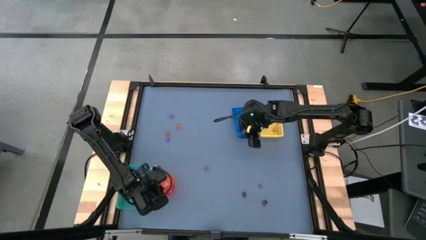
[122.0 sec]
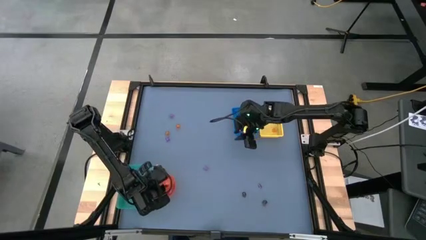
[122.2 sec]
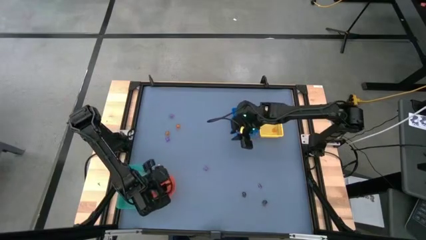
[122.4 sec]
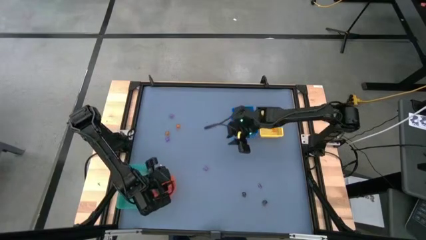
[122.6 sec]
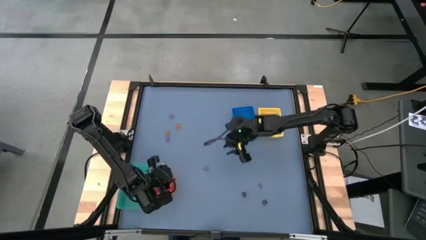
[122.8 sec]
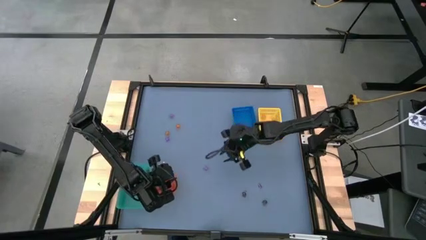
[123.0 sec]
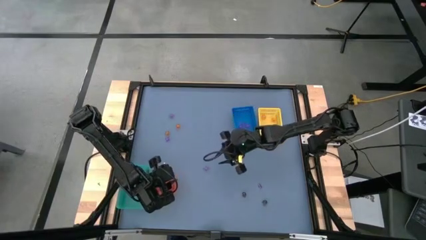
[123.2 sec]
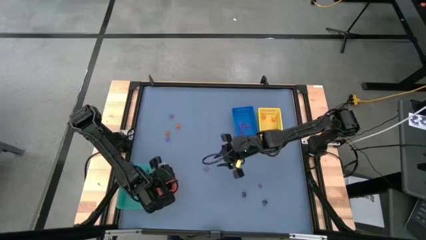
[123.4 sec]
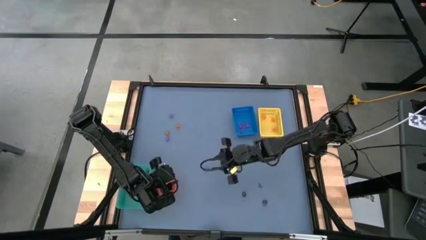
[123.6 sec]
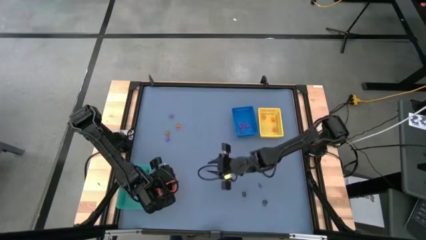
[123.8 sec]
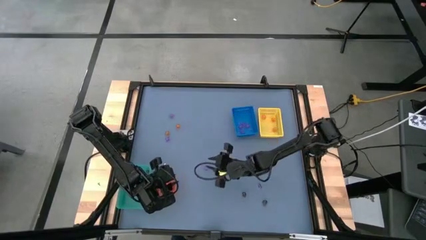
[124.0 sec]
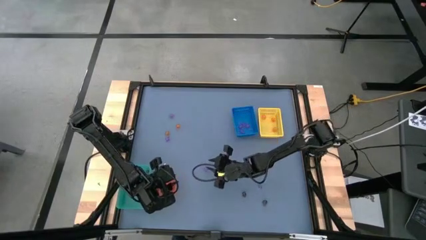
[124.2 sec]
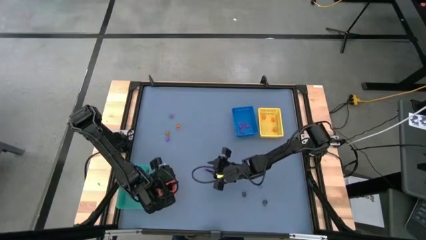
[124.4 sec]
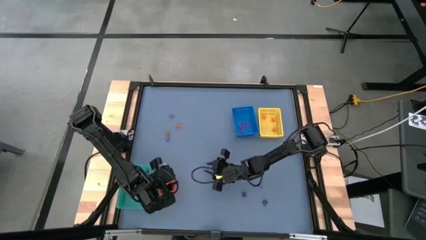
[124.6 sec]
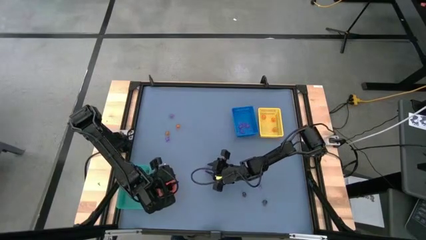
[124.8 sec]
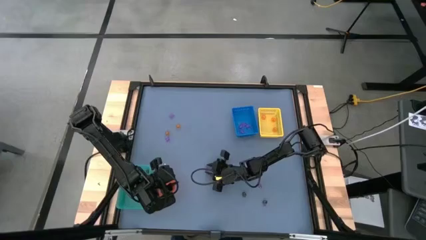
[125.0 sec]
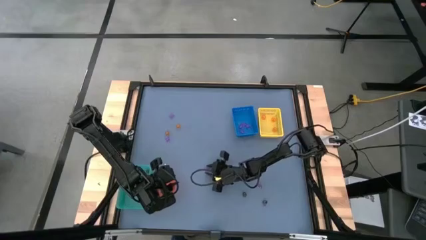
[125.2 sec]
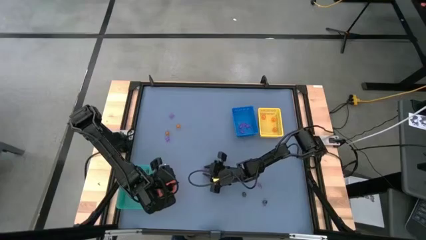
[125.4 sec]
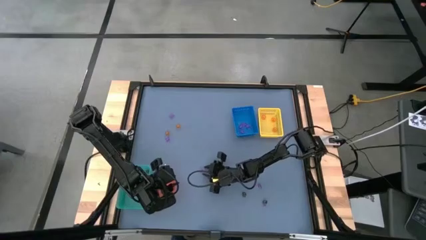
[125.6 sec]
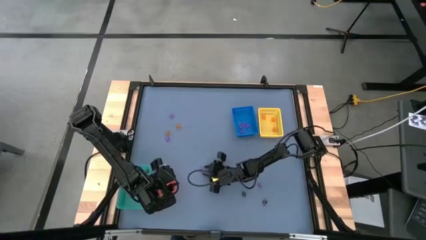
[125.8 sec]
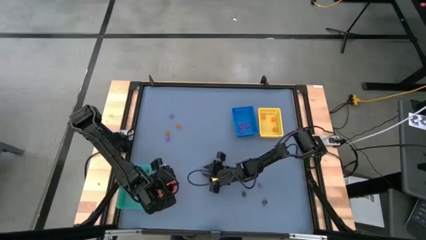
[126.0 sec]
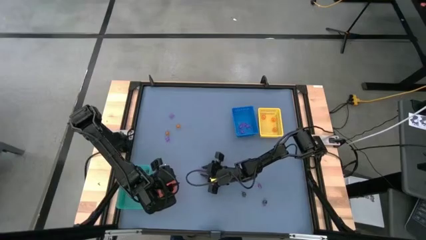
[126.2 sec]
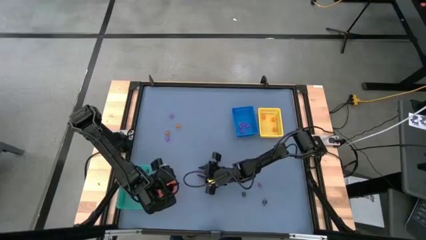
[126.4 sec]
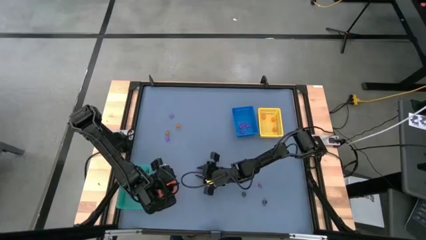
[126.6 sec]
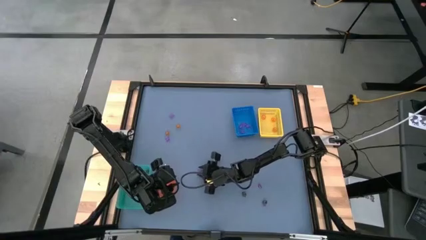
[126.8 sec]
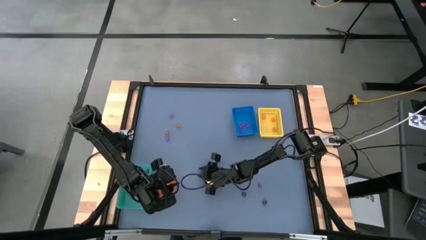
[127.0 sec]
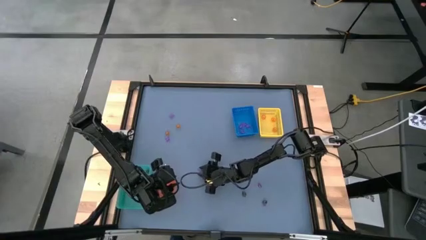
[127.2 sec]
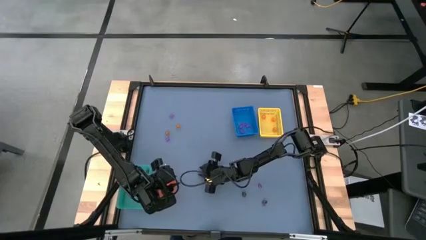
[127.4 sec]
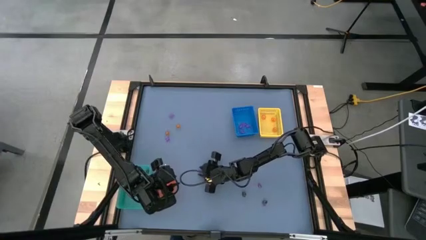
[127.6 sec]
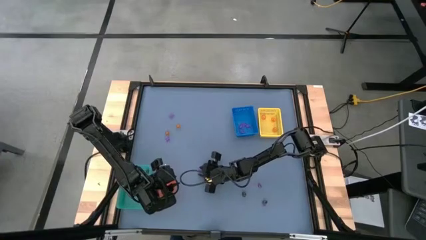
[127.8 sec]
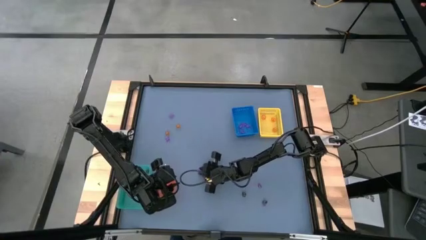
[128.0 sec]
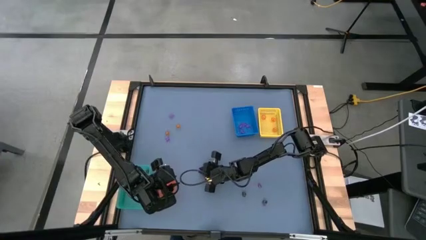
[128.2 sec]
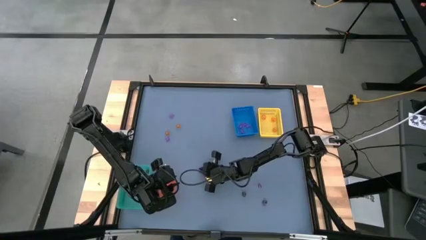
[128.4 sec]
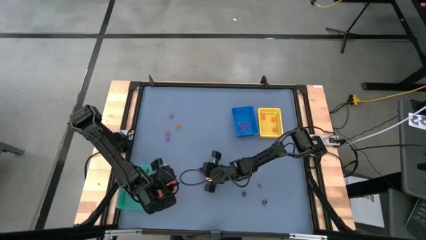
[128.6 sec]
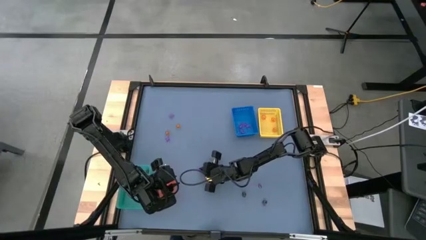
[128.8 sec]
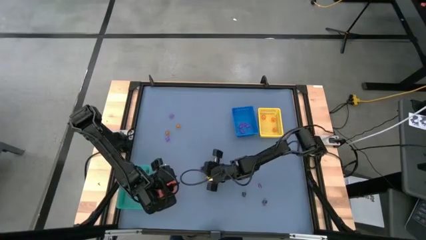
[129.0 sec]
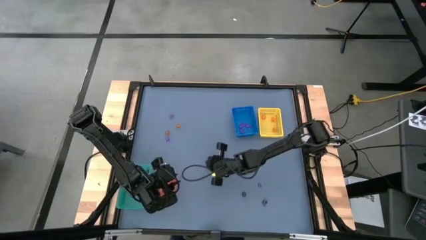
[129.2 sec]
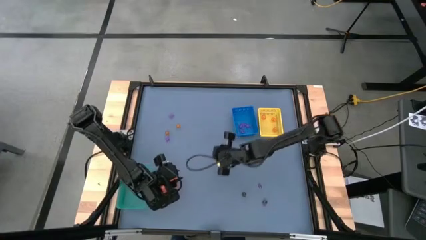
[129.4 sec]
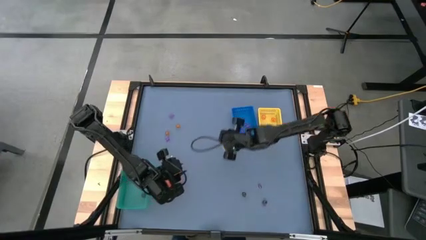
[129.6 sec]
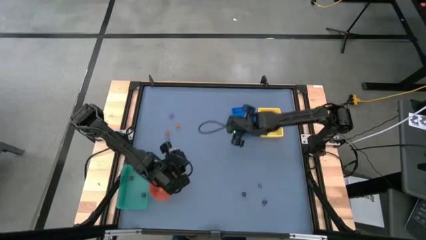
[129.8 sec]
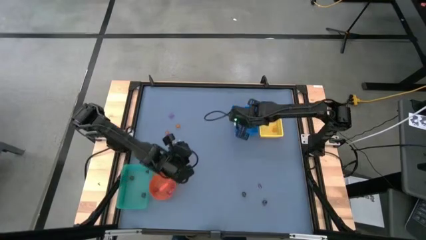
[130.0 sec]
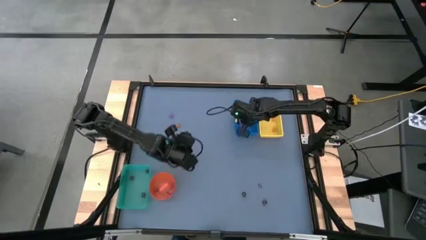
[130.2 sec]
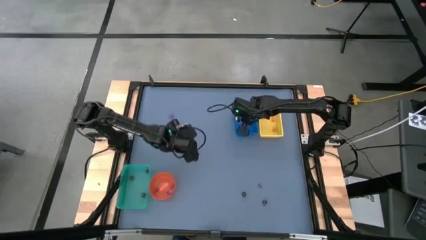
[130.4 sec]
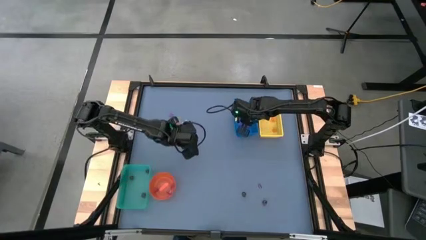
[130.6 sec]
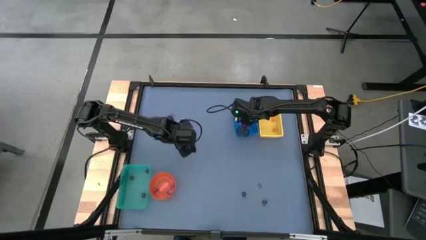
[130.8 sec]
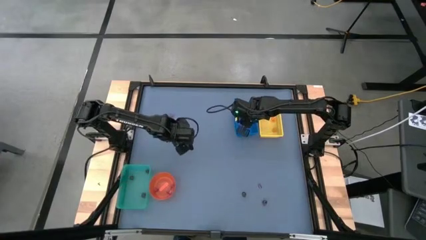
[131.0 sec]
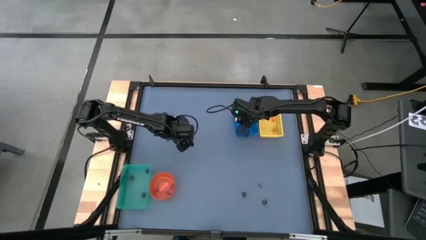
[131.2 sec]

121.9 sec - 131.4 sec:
Task: Sort Halloween decoration
Put the violet spider toy into the blue box

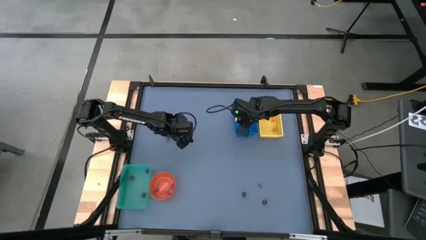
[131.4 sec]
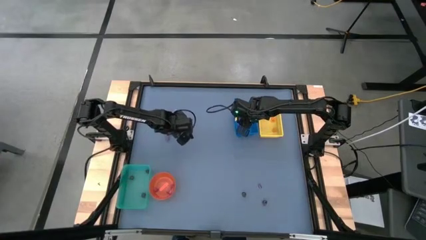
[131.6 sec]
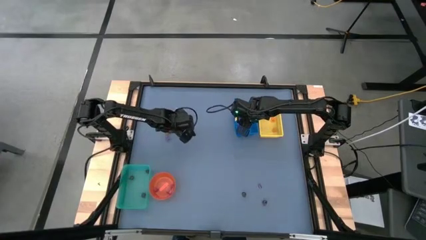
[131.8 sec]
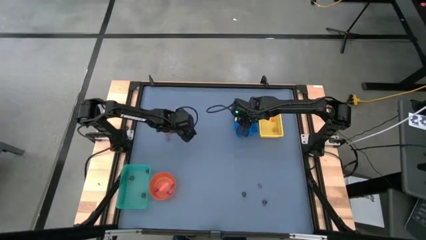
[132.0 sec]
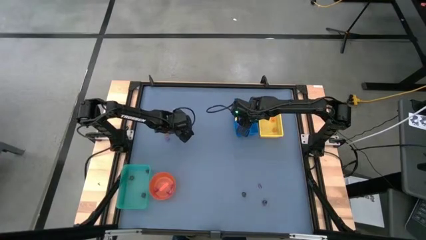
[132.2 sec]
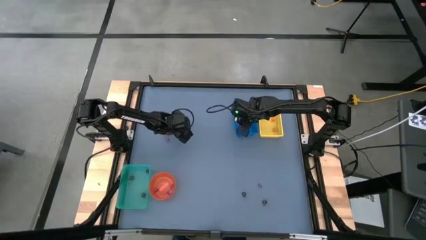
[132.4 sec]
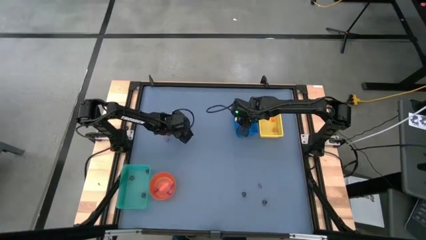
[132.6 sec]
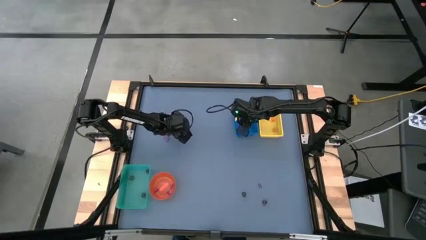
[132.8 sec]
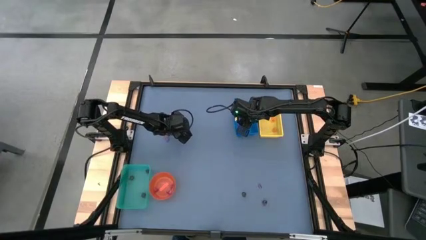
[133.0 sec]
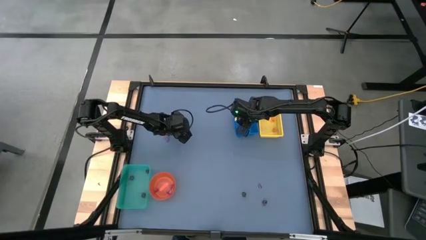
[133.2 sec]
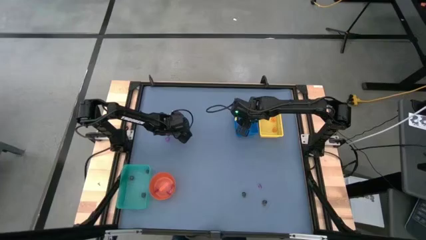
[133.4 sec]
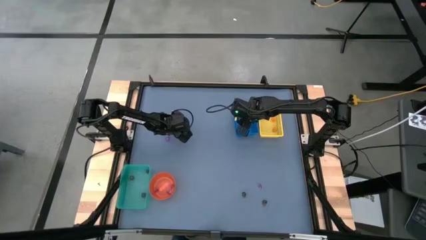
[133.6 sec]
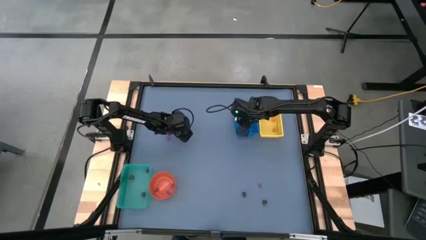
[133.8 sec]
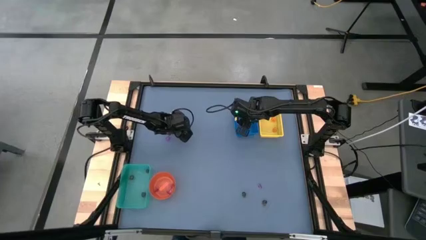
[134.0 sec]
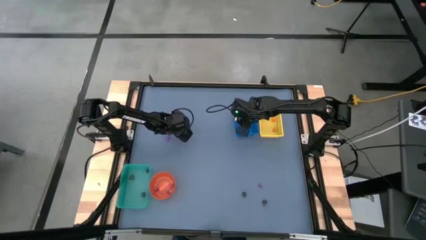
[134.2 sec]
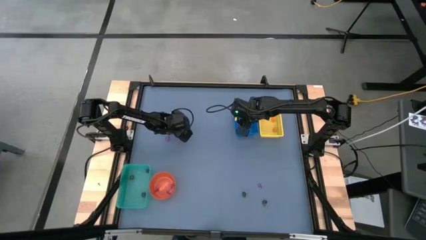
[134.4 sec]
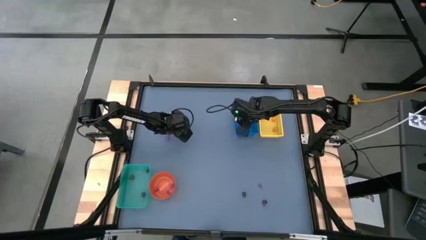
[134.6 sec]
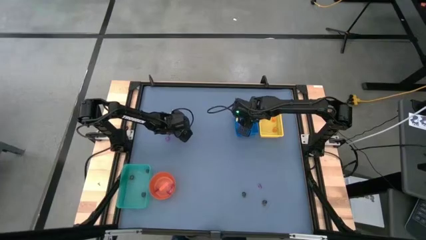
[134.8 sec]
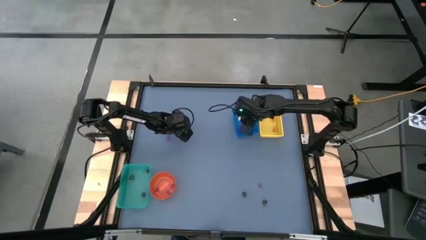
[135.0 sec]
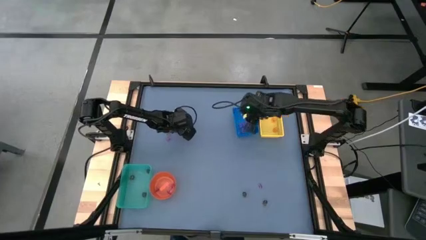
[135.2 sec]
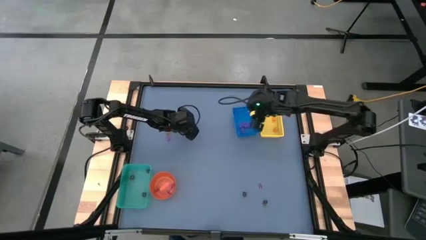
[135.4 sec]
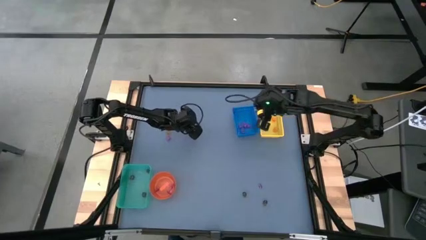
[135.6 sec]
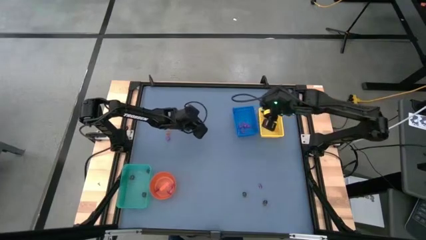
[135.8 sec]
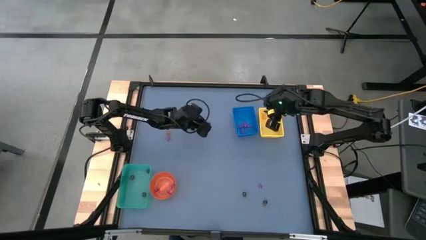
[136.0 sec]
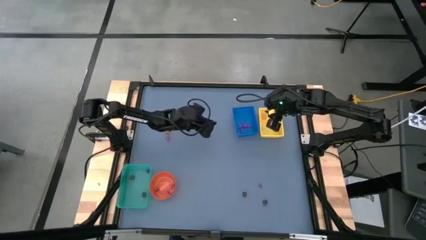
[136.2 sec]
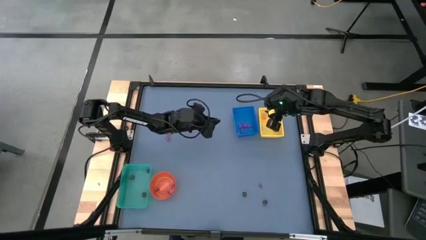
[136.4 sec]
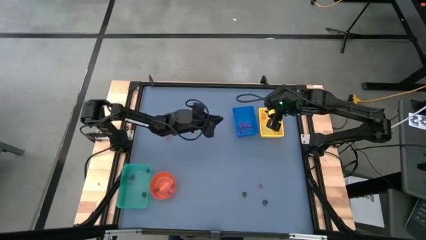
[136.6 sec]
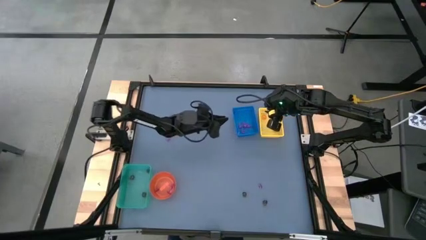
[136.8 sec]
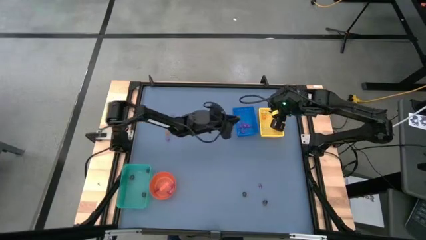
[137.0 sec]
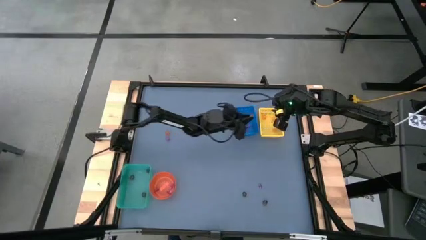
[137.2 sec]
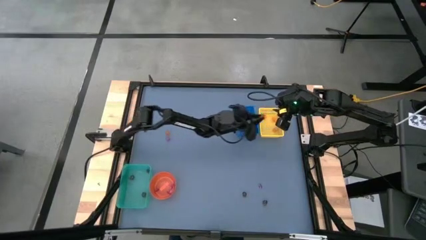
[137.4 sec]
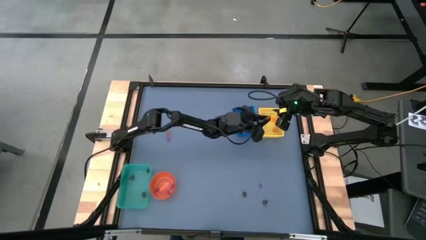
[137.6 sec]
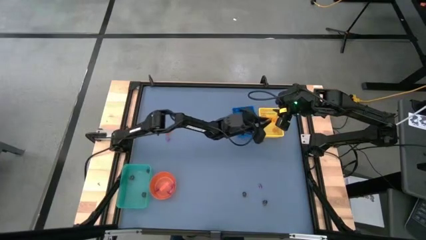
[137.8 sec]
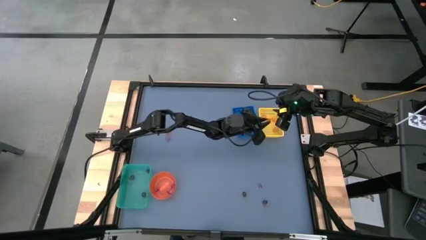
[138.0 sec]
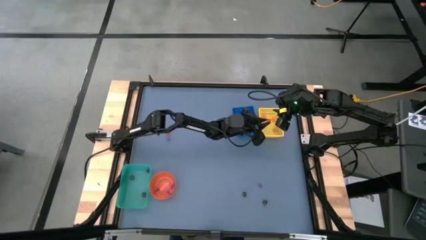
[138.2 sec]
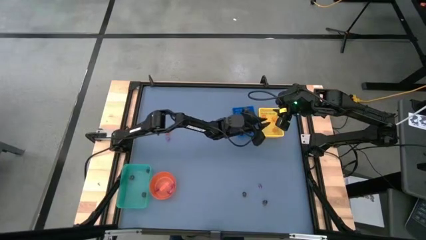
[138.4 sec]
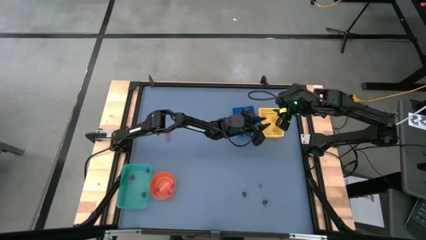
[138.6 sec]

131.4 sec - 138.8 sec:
Put the orange pumpkin toy into the yellow box
